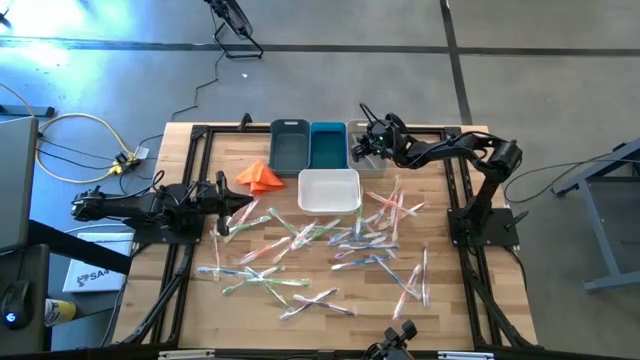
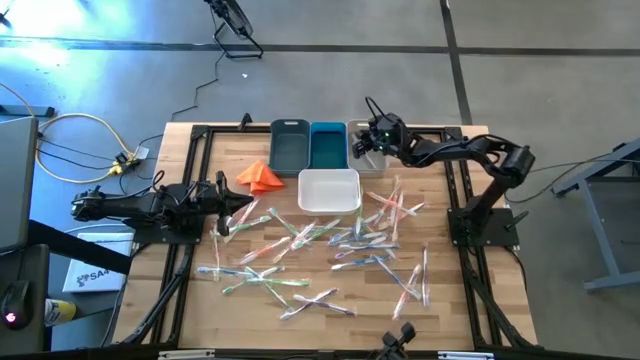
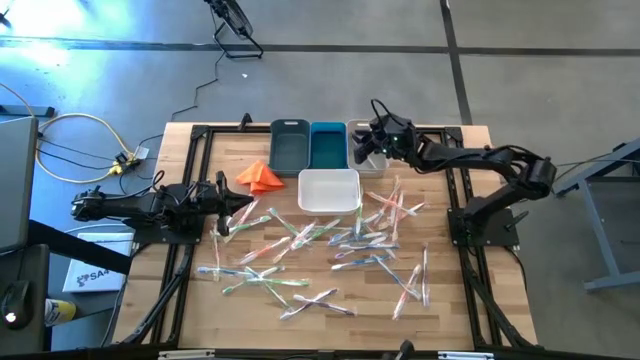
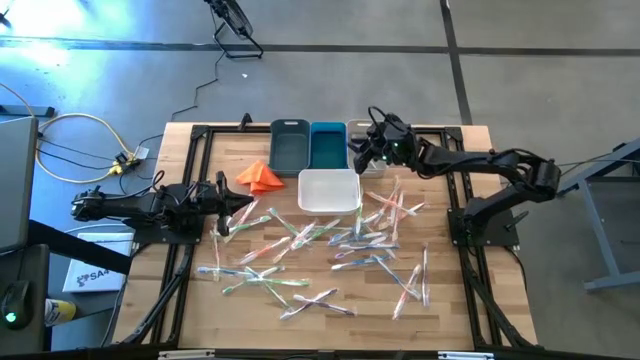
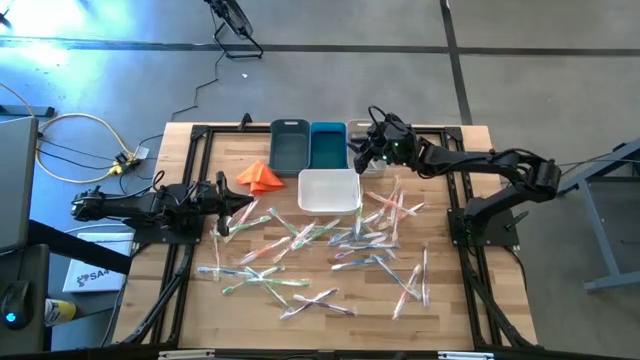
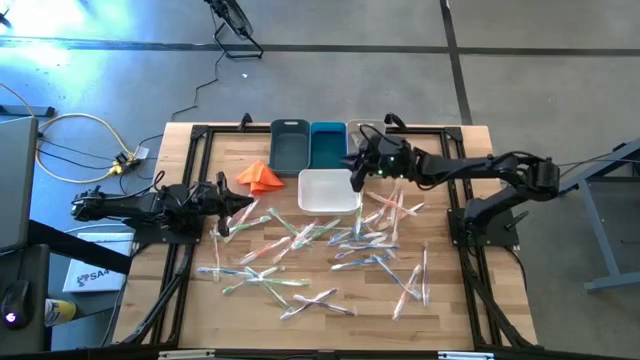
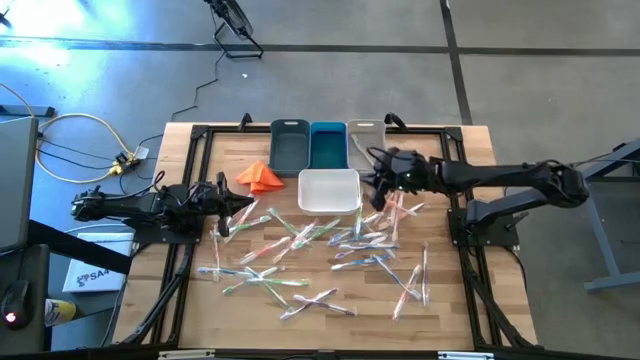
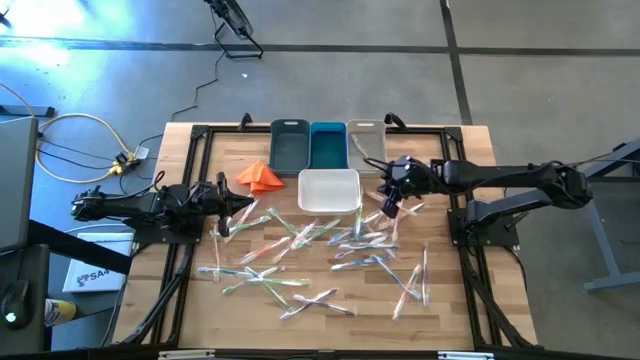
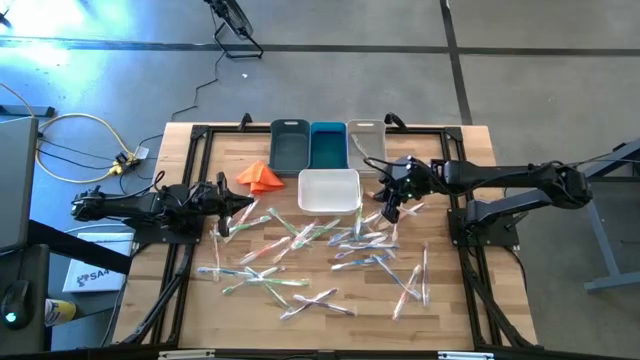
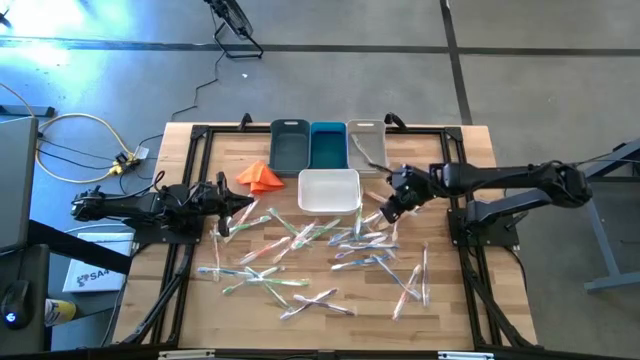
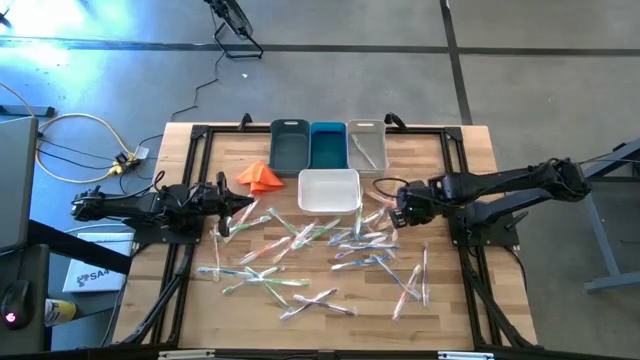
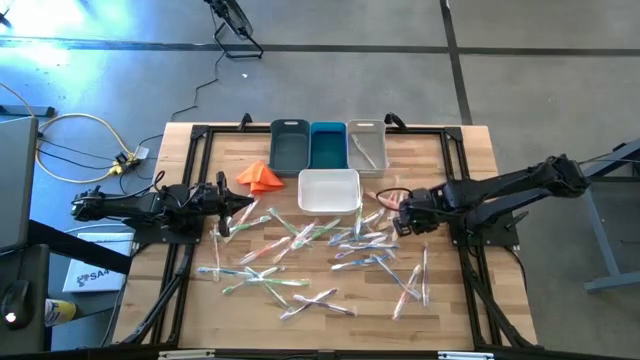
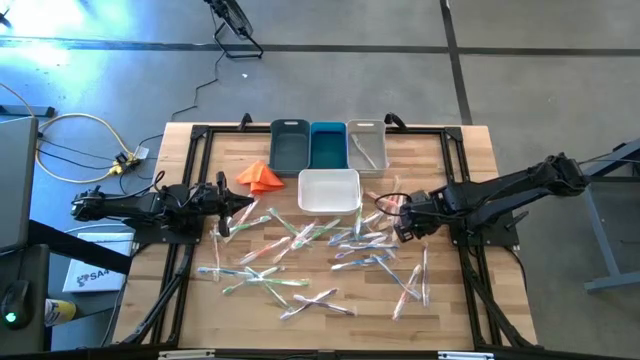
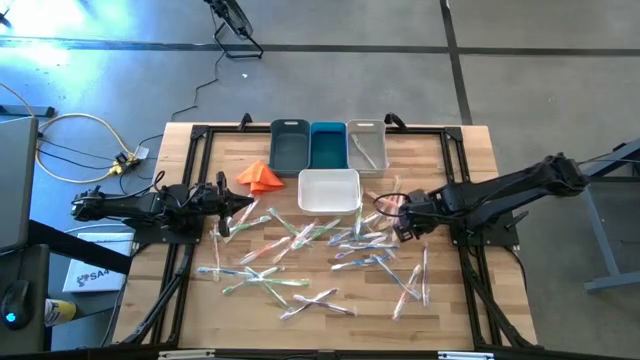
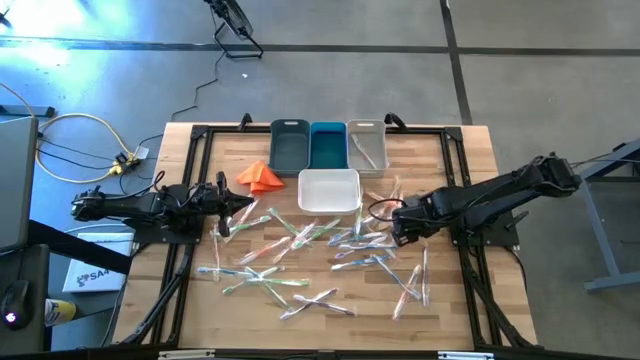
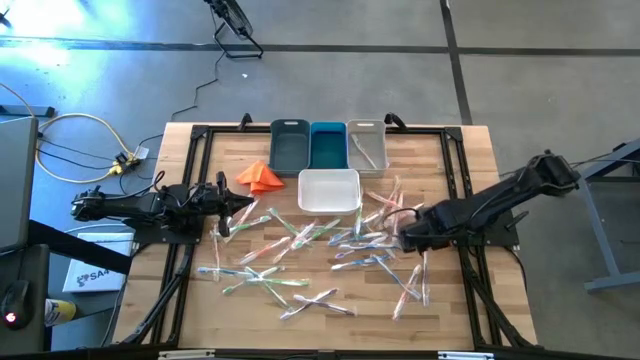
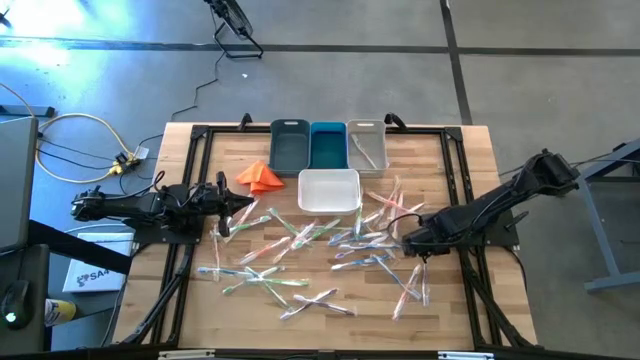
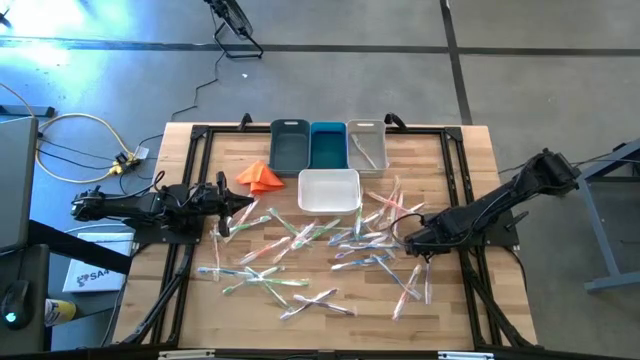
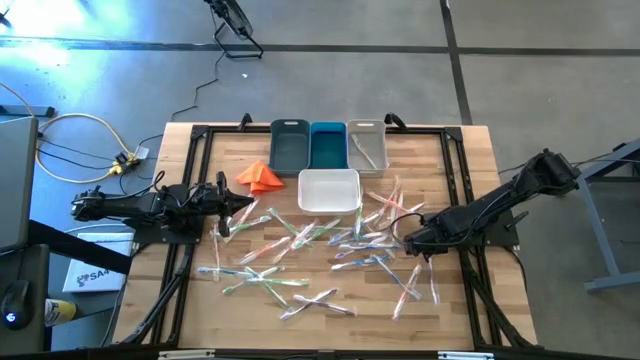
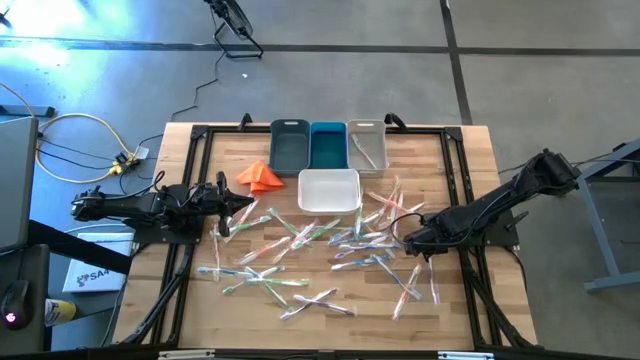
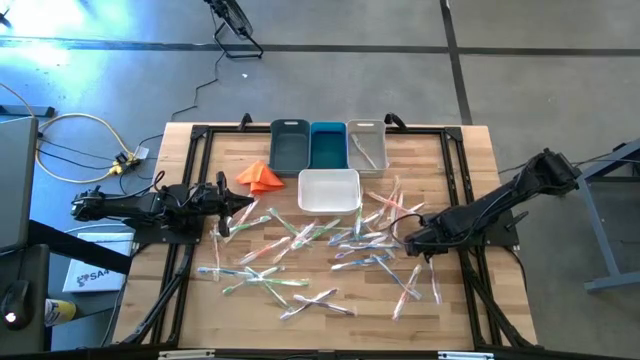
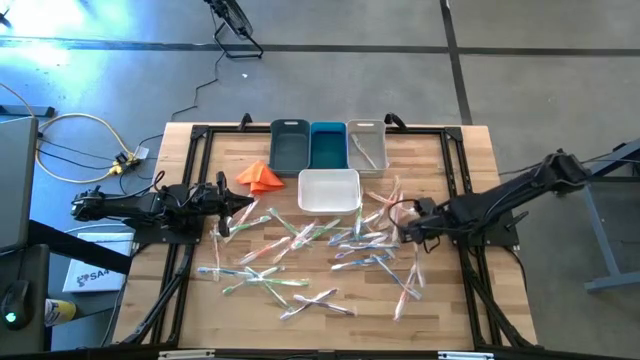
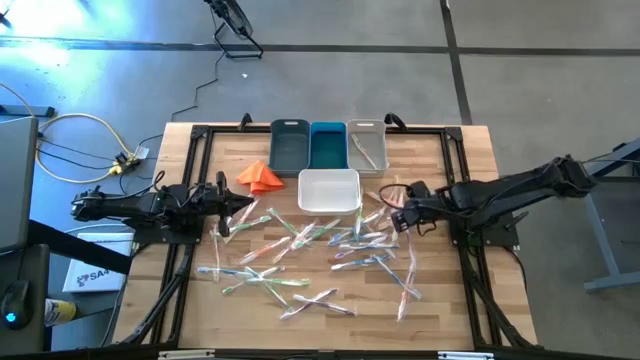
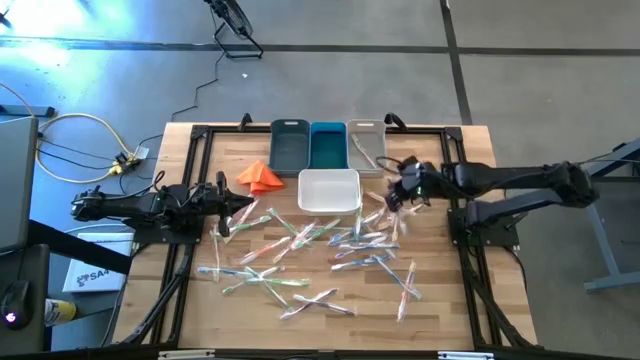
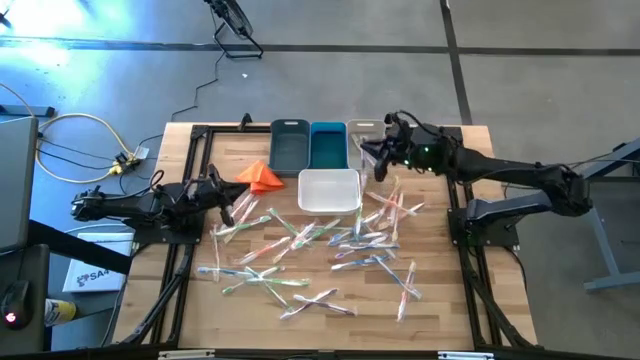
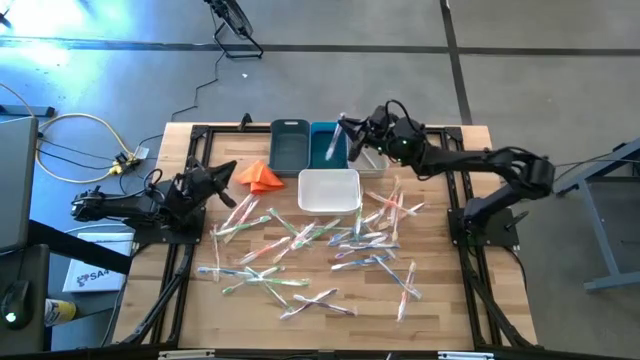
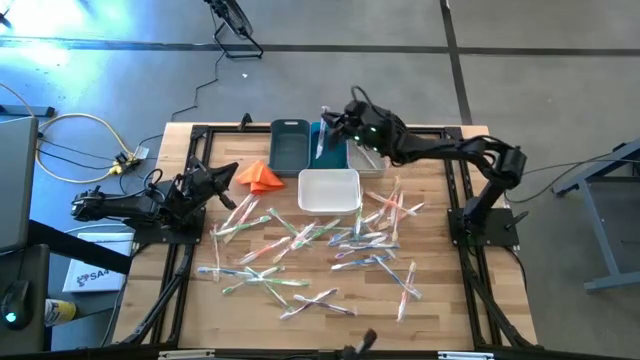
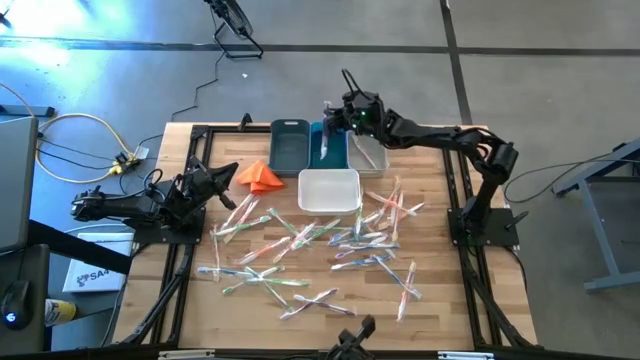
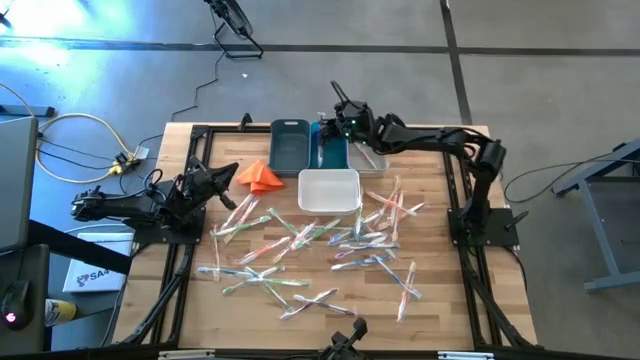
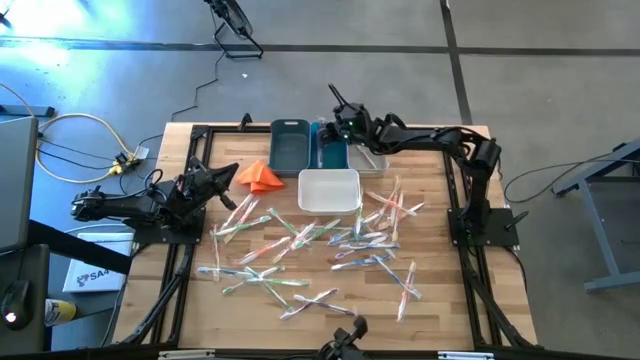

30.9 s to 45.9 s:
Task: Pick & Place Toothbrushes
Put the purple toothbrush into the blue bin

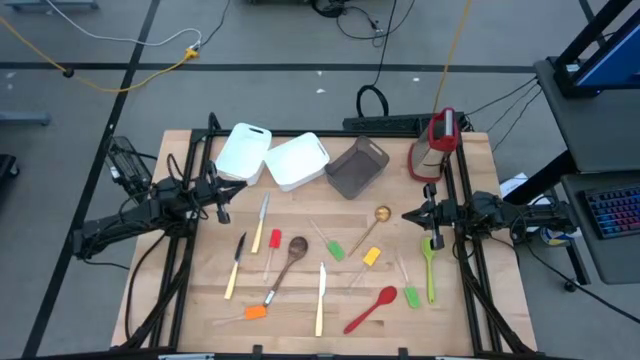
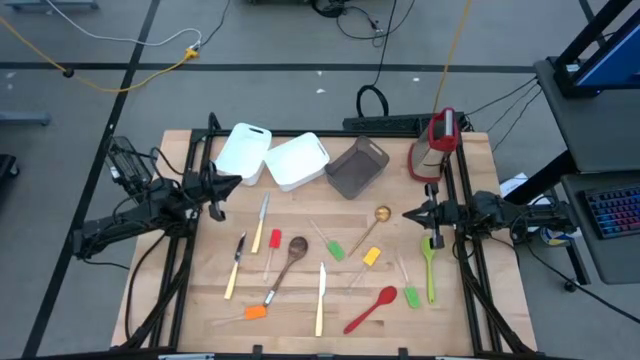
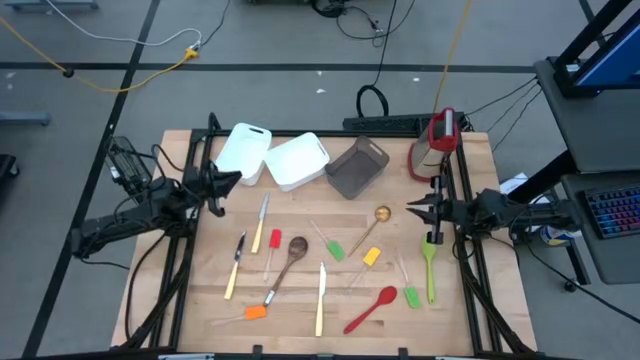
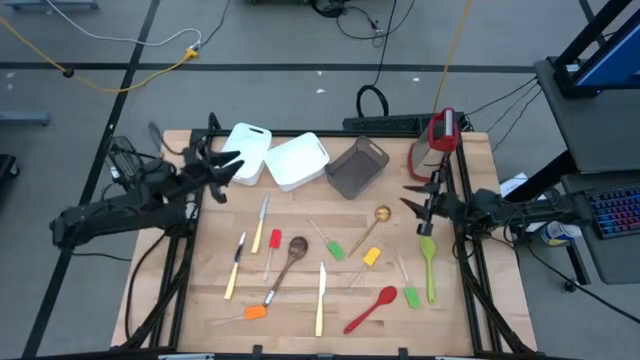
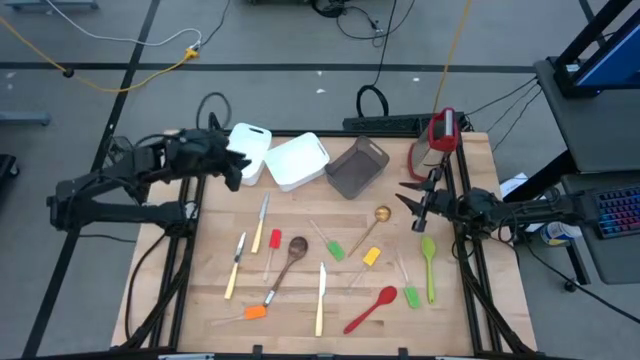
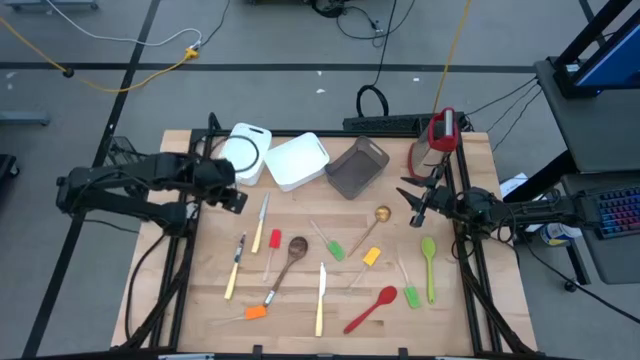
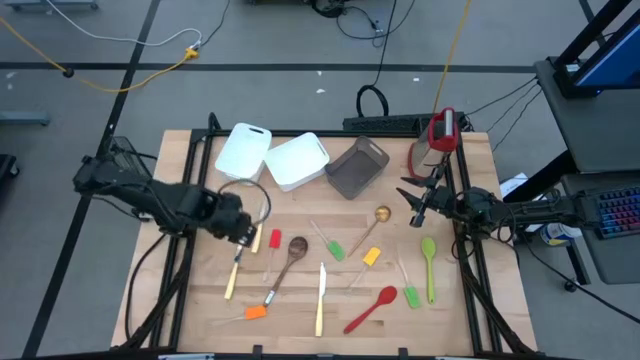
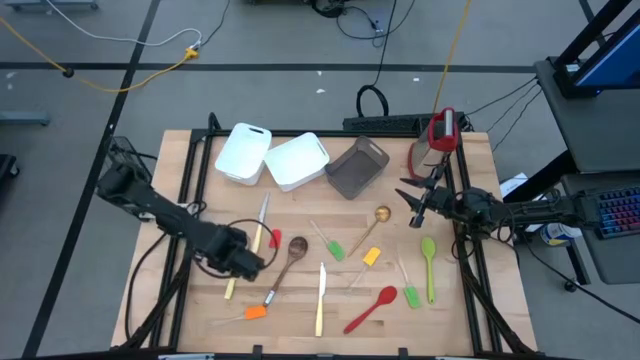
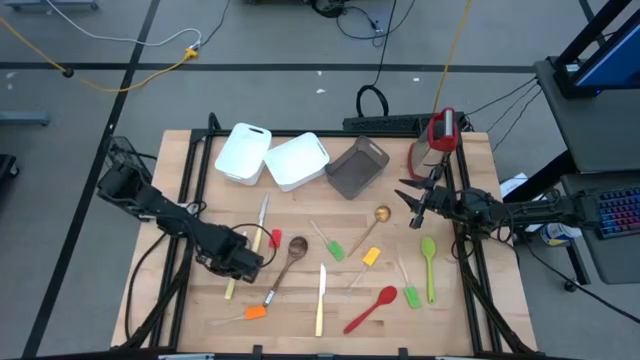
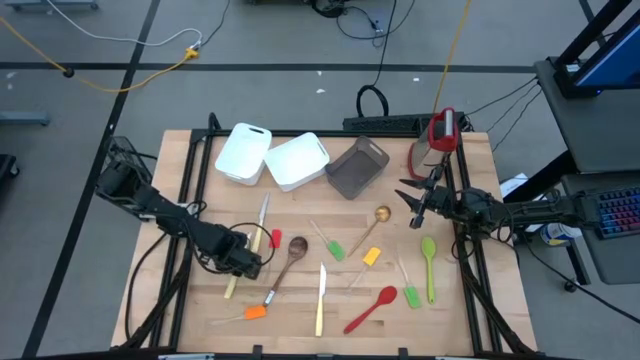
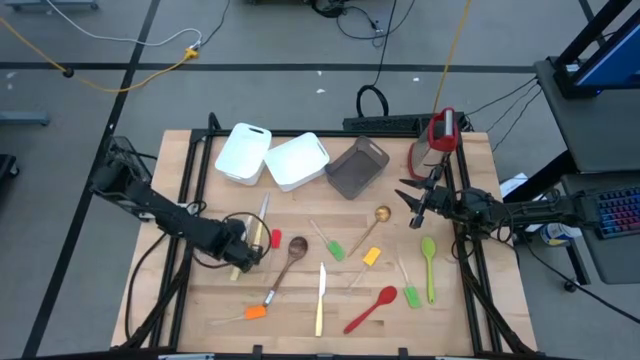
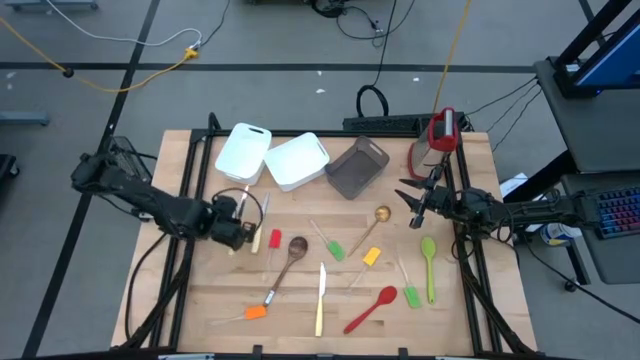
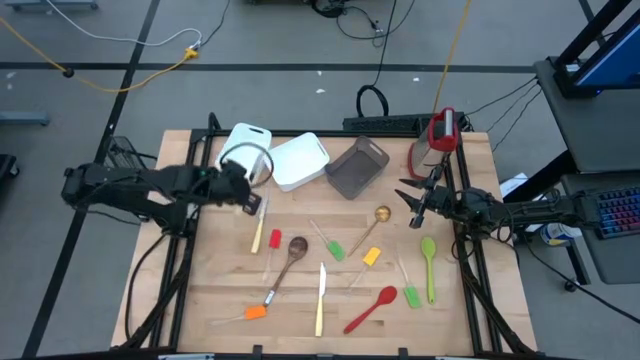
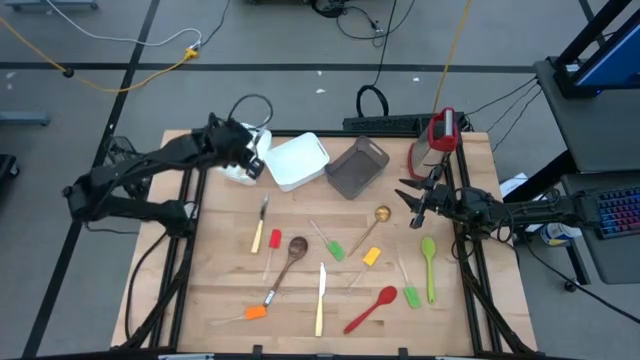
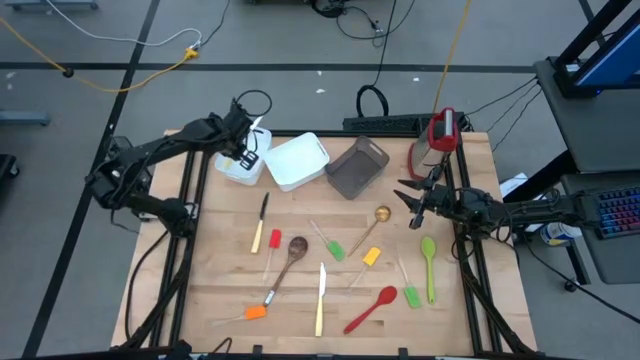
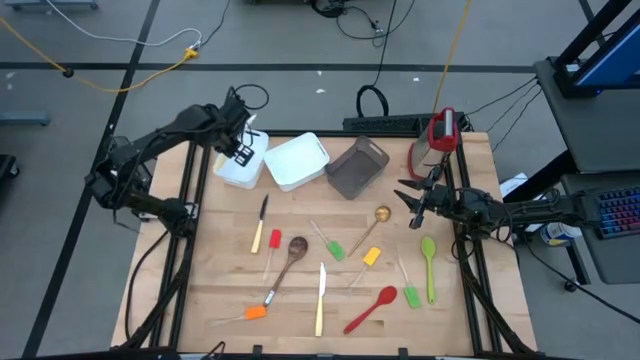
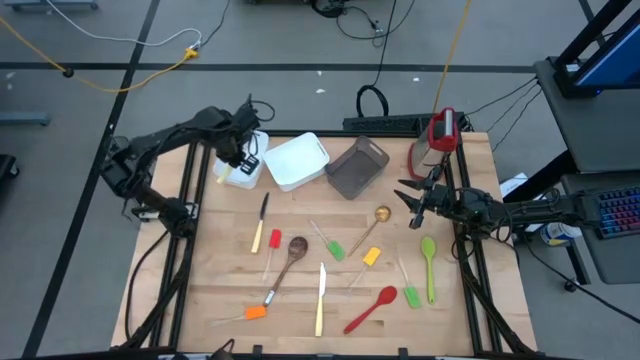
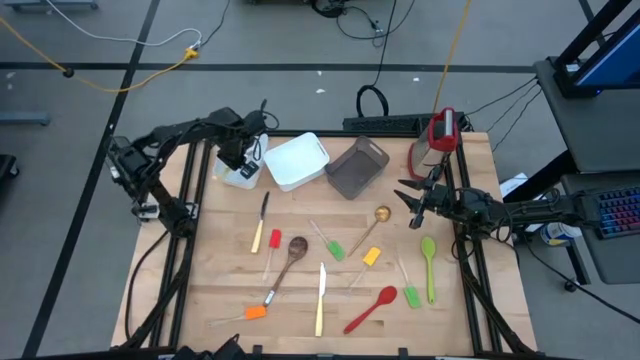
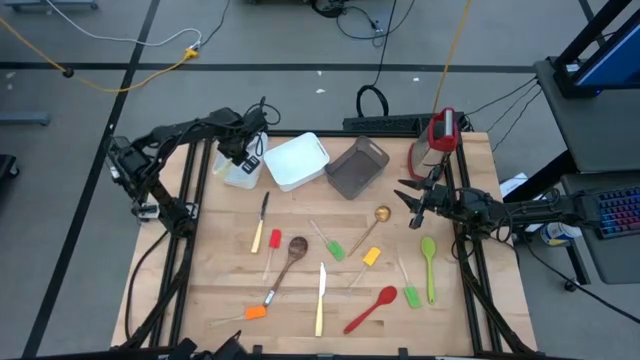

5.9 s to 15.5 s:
Task: Pick & Place Kitchen Items
Put the yellow kitchen knife into the left white bin
